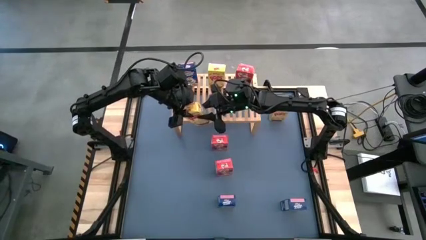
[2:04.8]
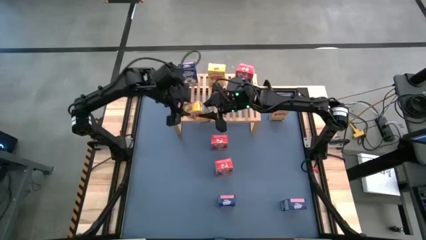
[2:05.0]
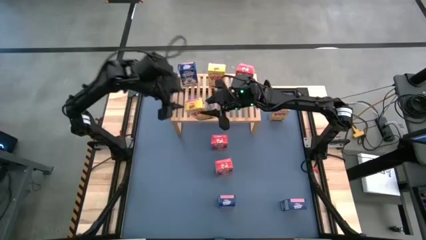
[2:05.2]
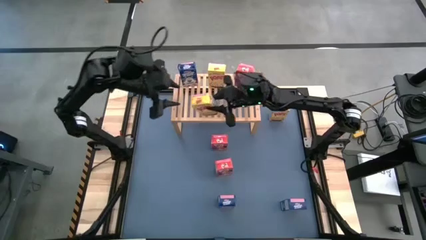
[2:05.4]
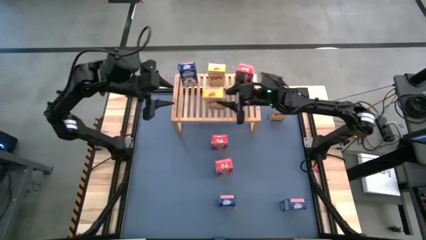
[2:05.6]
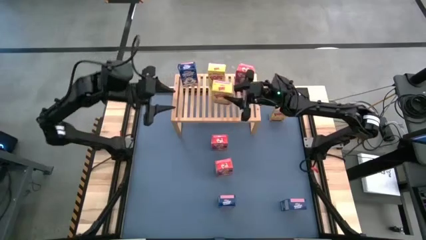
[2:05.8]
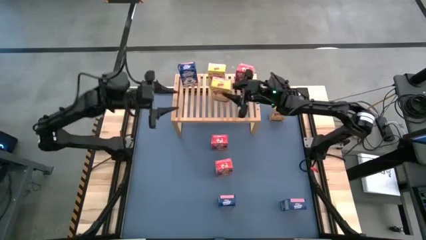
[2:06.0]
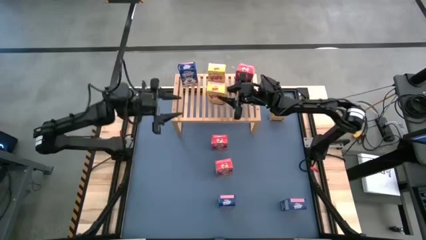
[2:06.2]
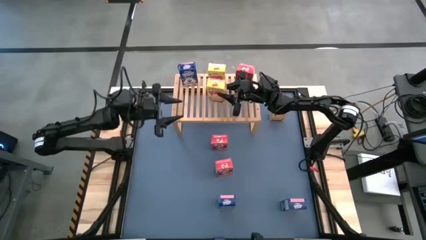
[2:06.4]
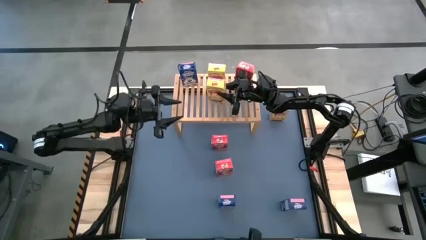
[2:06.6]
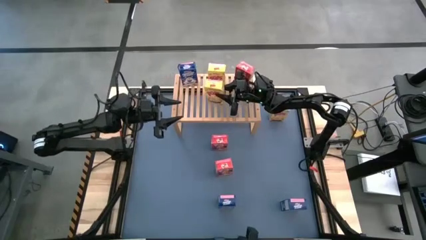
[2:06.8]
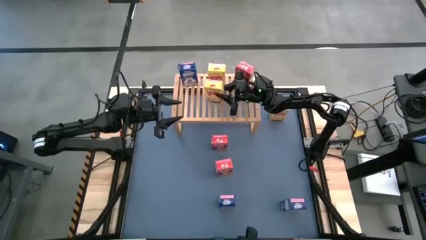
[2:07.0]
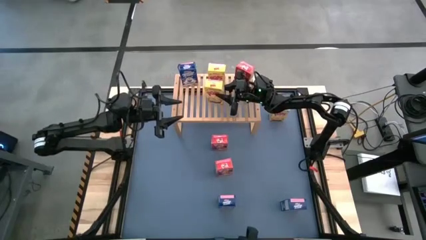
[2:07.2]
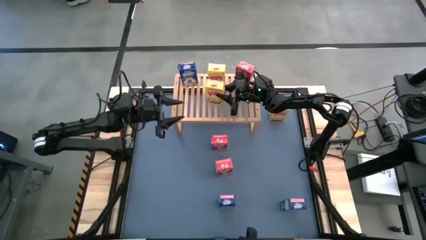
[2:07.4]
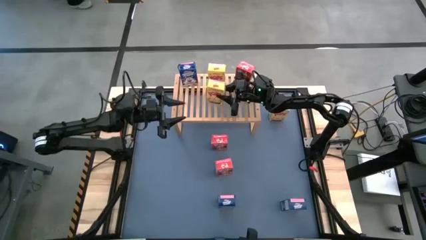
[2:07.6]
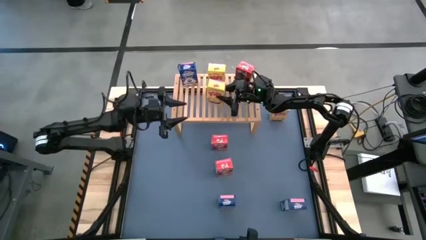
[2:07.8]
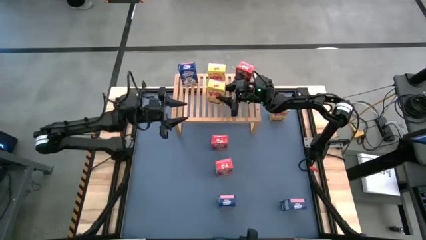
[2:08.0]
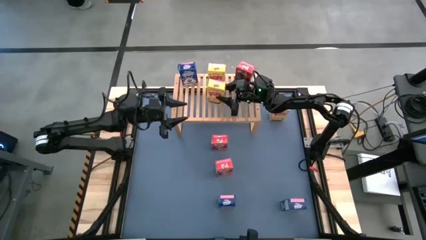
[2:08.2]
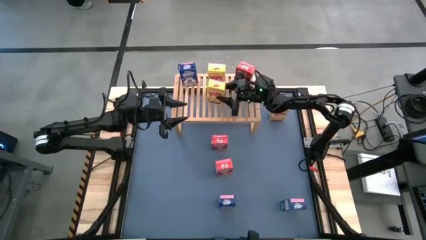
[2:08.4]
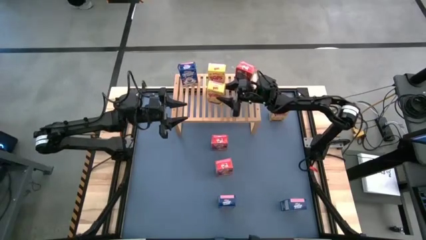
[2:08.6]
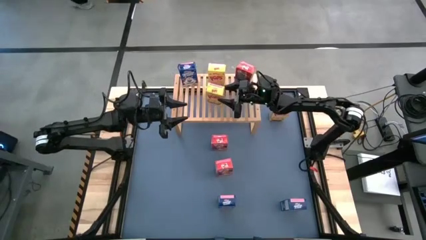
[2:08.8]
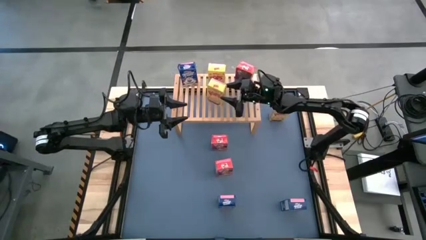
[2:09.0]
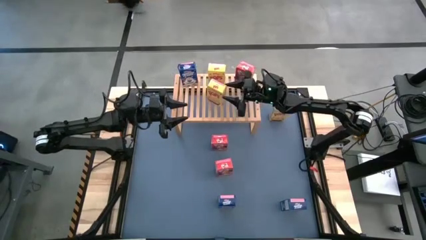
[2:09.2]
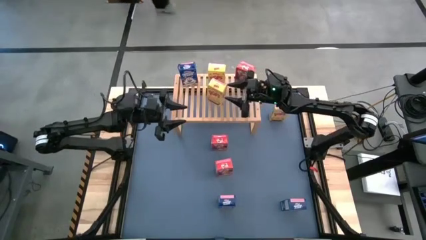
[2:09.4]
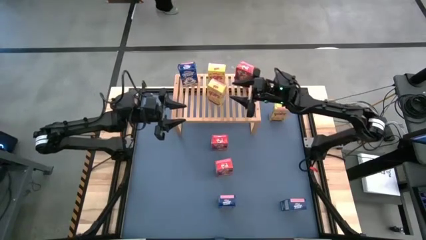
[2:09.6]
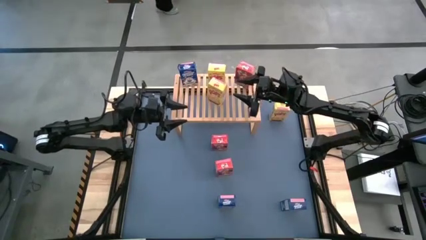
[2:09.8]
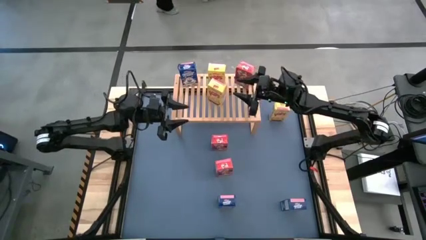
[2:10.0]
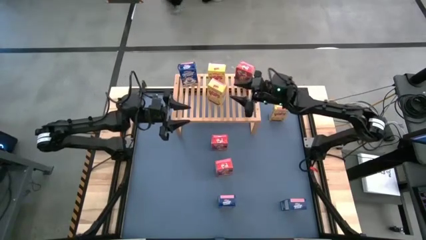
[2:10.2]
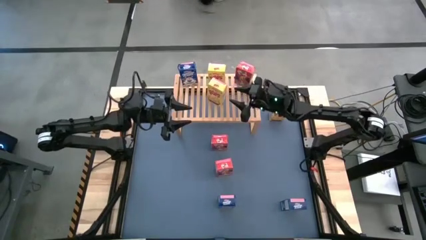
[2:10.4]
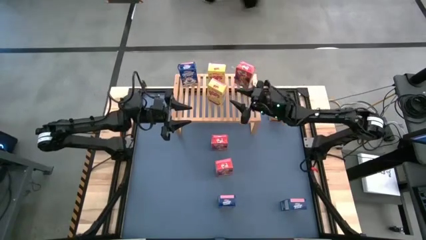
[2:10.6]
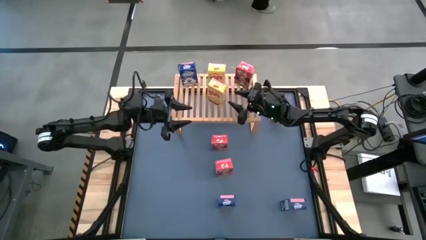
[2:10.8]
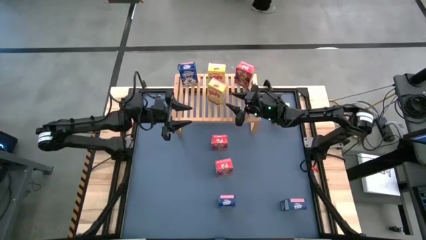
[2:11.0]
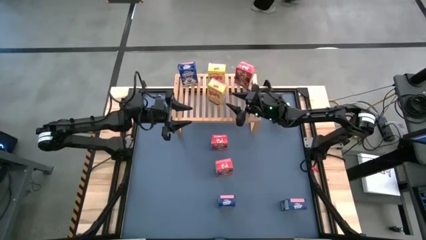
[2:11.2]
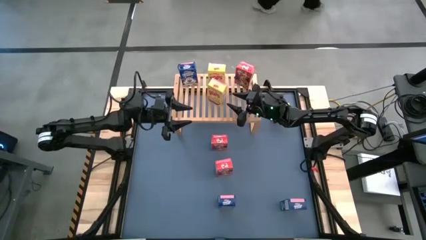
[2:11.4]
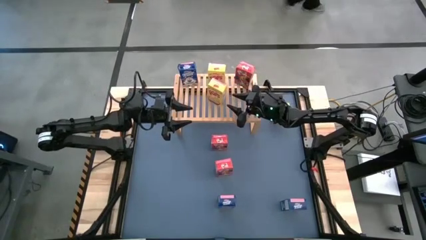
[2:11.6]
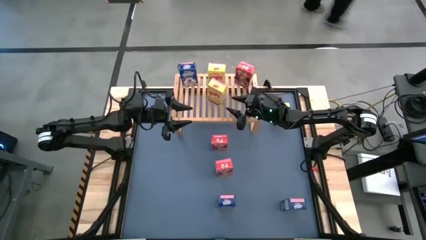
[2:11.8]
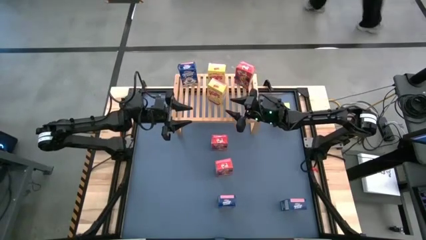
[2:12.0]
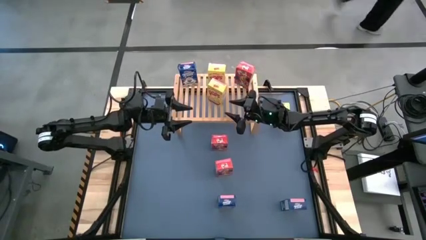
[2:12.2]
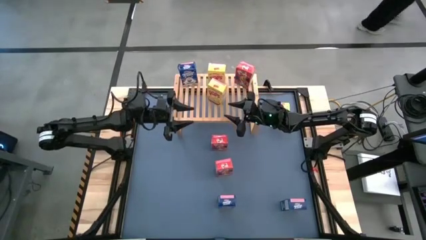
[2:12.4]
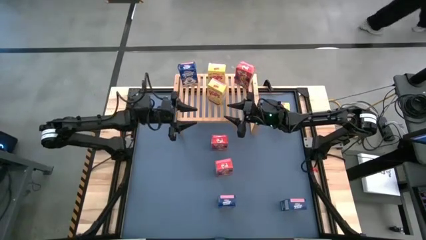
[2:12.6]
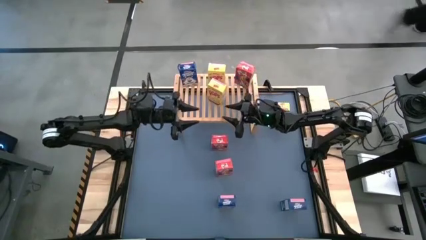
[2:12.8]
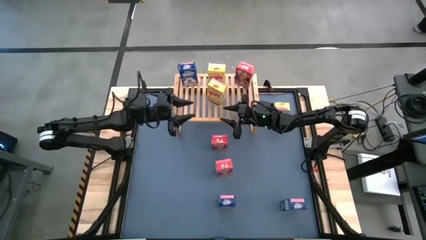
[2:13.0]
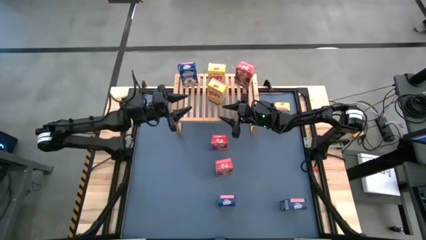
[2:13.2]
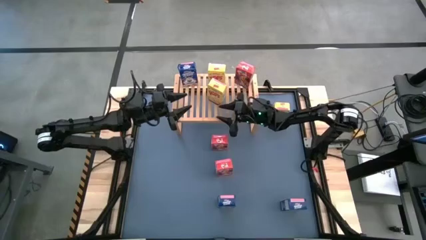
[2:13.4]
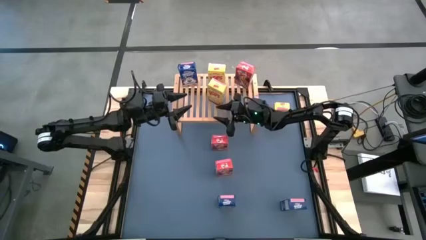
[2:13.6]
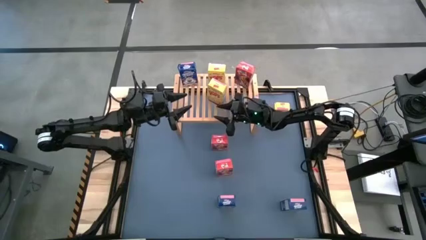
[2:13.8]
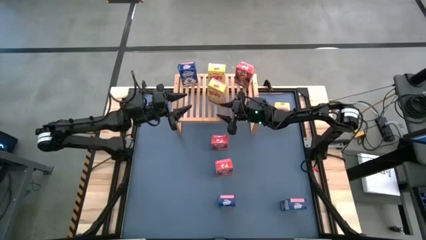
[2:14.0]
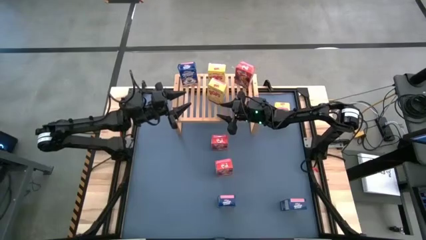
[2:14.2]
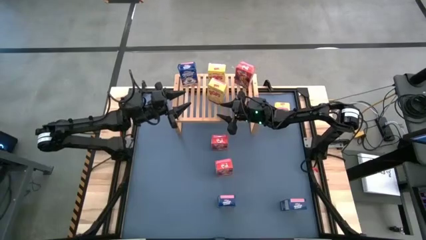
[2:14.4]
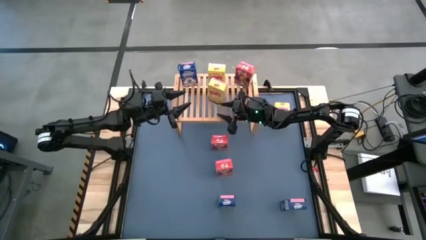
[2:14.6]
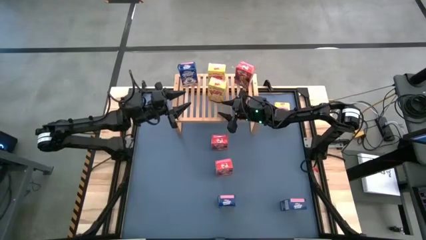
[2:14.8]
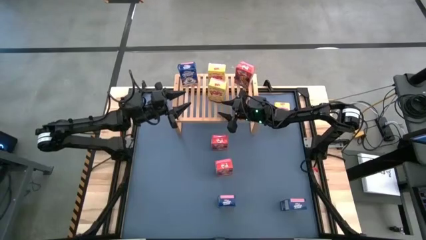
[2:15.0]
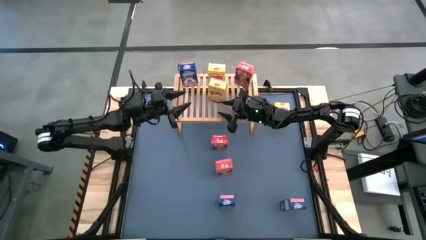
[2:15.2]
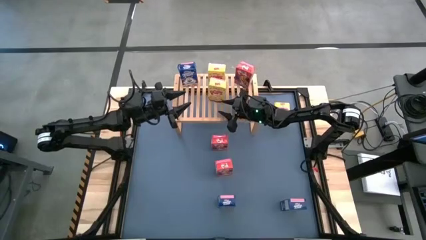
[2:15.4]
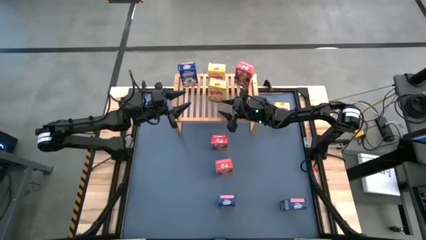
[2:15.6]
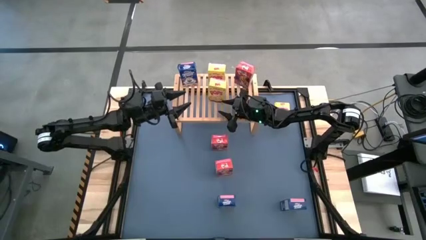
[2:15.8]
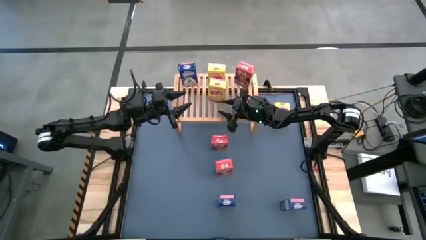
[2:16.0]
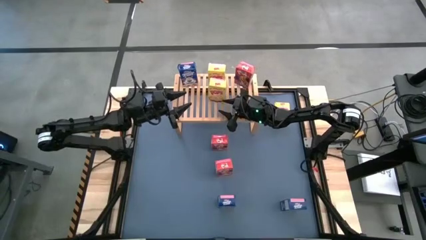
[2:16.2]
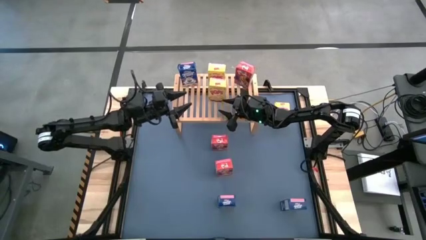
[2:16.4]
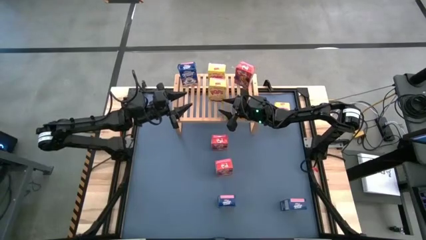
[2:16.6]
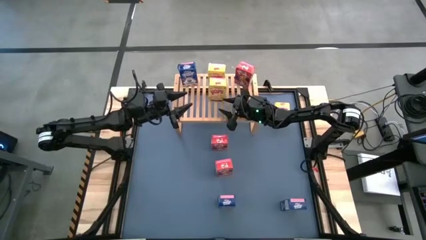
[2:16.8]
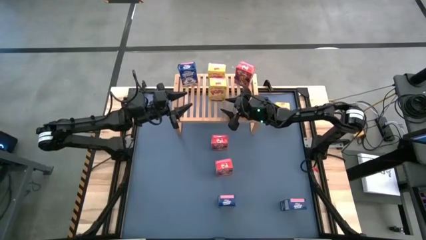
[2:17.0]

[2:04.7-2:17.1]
Task: Stack cereal on shelf
Put the left yellow cereal box on the shelf aligned with the other yellow cereal box

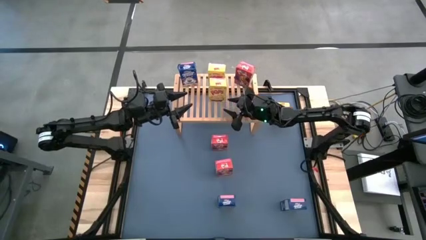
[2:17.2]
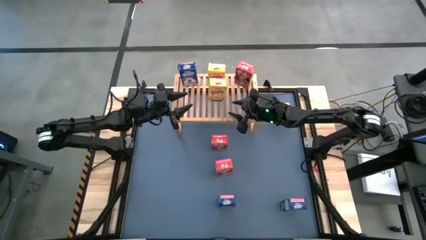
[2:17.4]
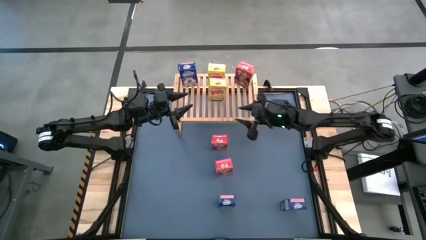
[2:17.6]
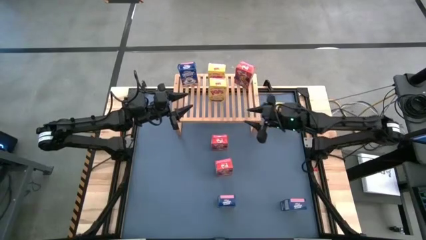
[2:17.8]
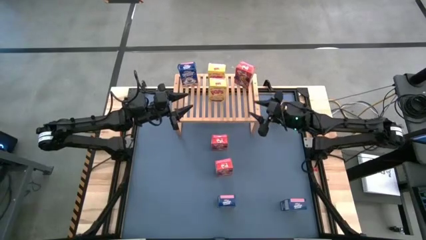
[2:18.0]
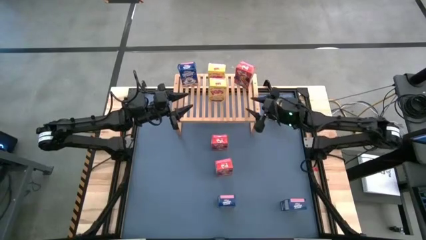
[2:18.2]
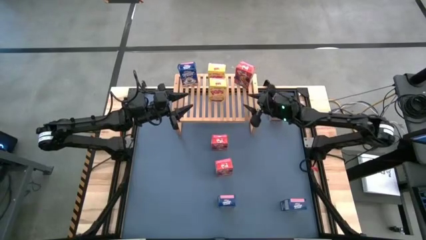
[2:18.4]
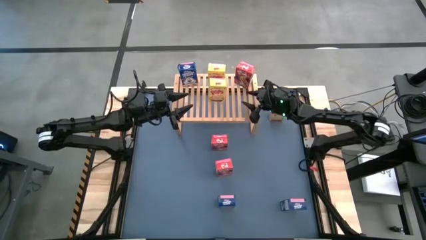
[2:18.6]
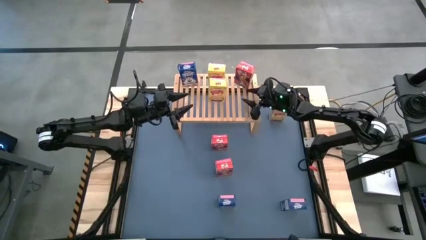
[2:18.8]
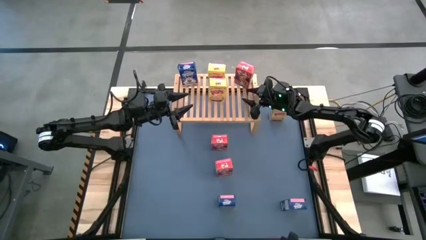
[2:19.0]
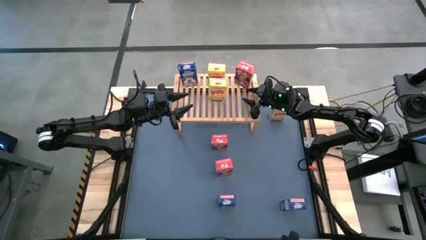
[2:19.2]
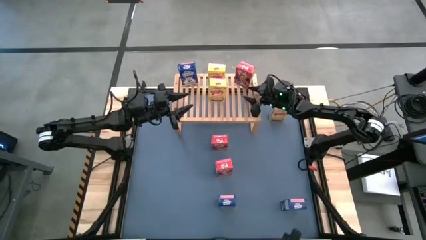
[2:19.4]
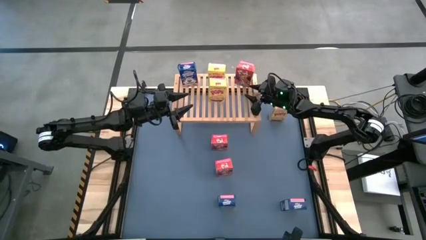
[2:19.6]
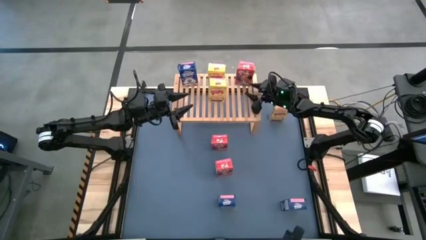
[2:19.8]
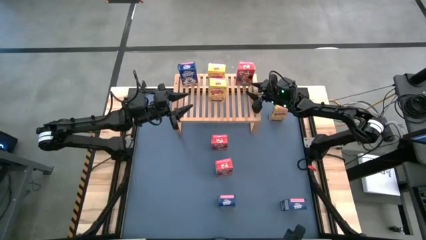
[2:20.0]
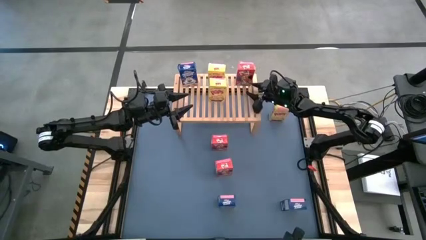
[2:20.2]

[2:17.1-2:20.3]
Adjust the red cereal box on the shelf
